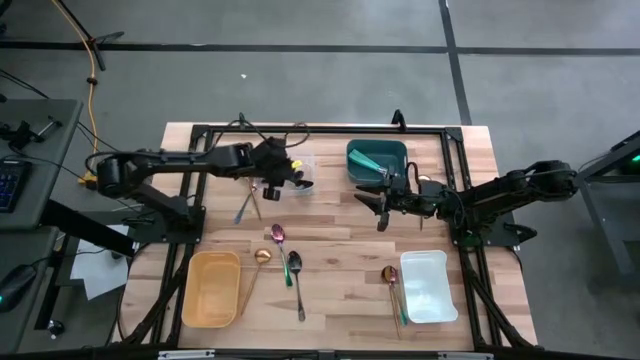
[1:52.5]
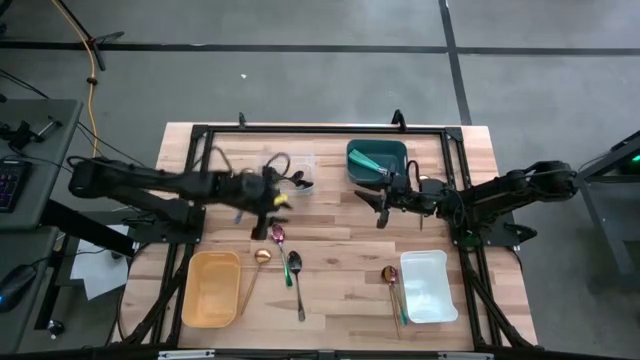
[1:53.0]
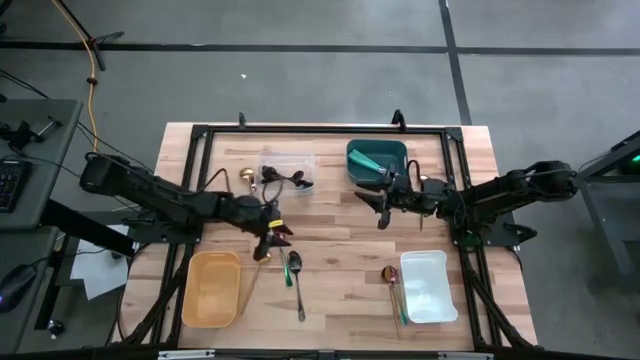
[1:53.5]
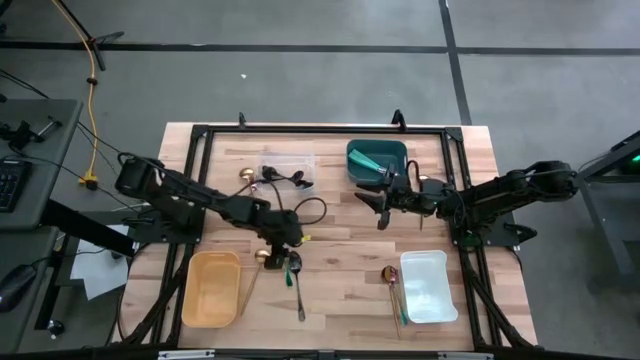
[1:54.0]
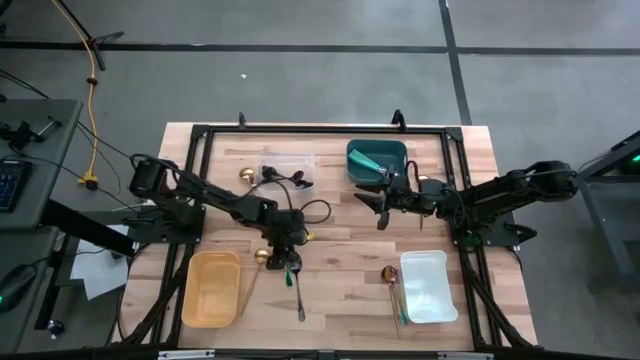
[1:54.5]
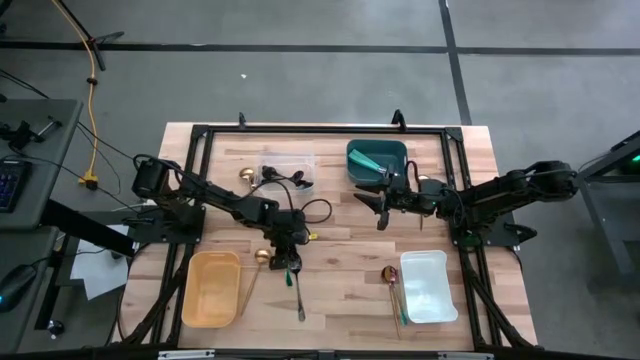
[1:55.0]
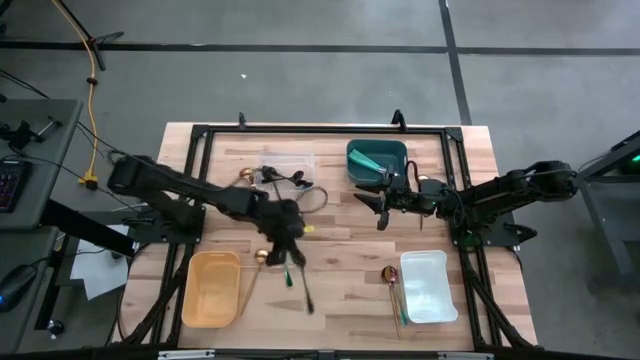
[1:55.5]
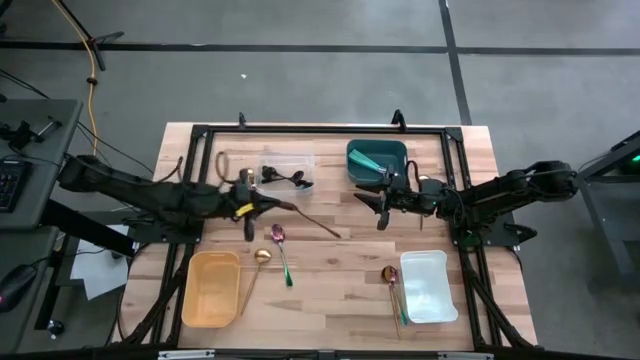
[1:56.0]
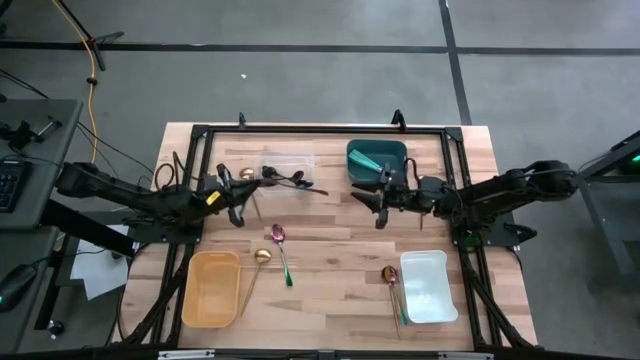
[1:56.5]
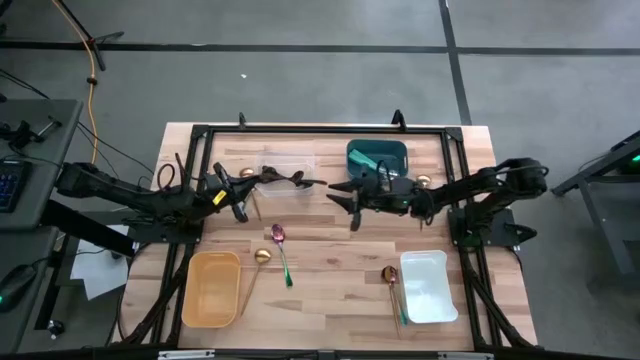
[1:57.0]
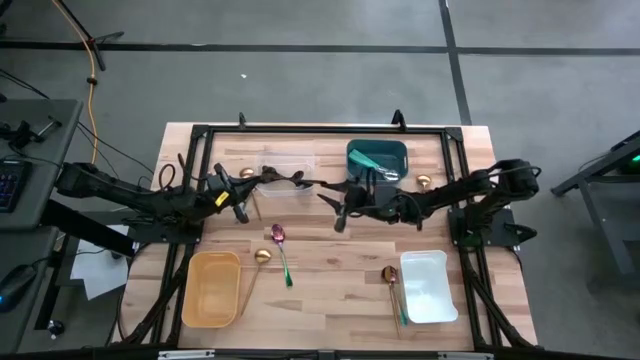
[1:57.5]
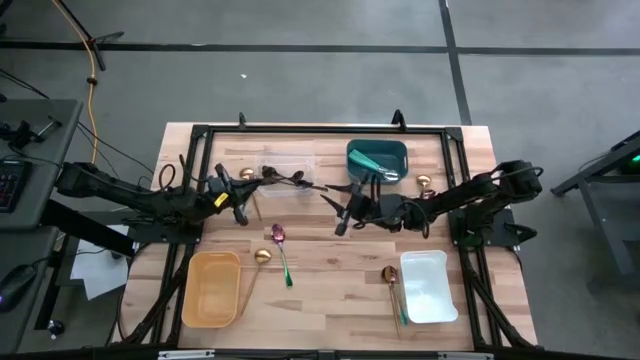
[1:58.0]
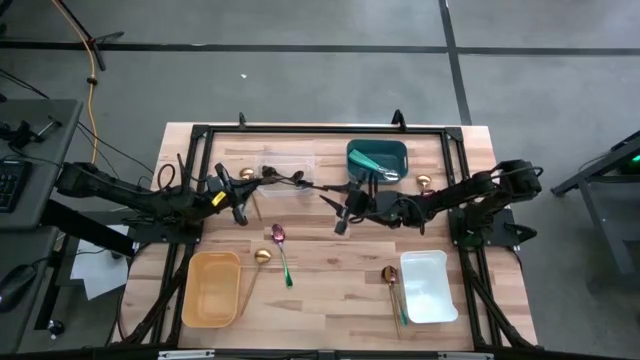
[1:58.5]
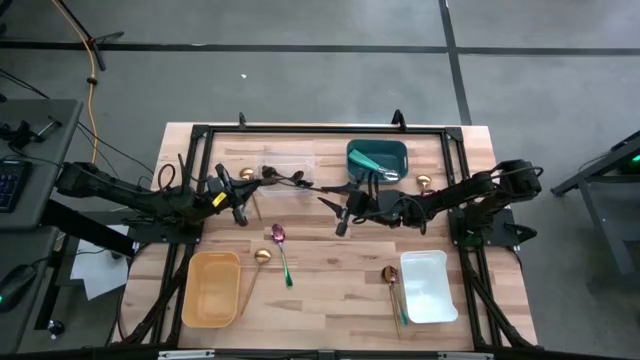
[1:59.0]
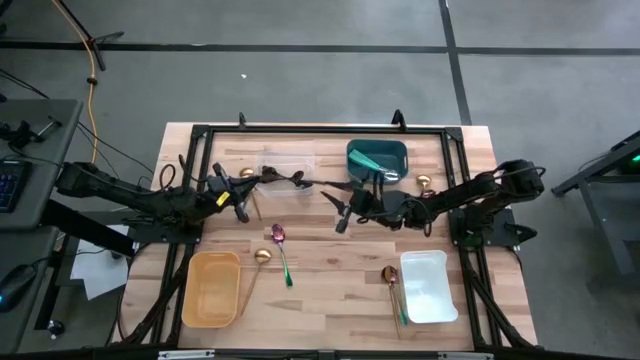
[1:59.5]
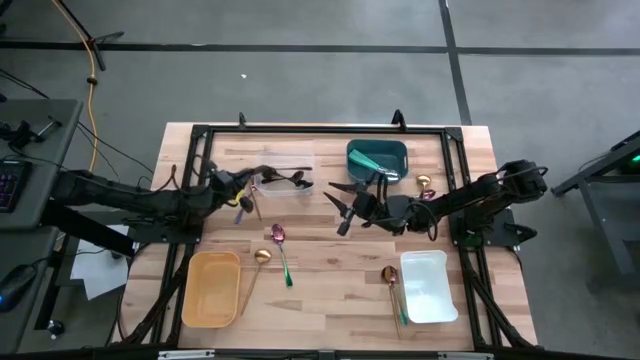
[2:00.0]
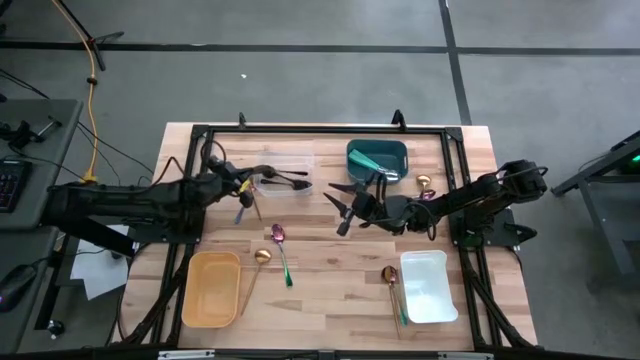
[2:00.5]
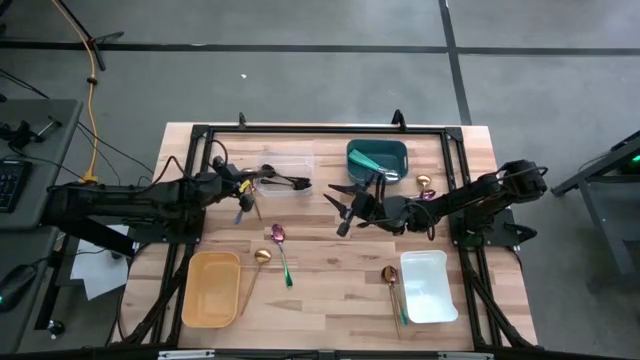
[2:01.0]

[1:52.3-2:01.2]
Task: Sort silverware by color (type)
Put the black spoon into the transparent bin

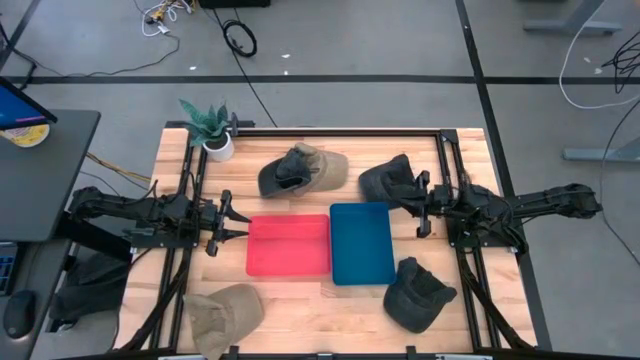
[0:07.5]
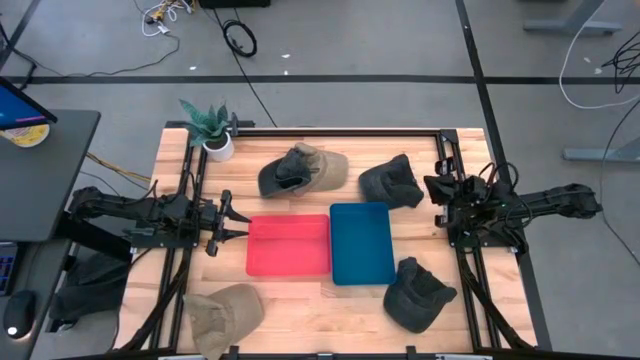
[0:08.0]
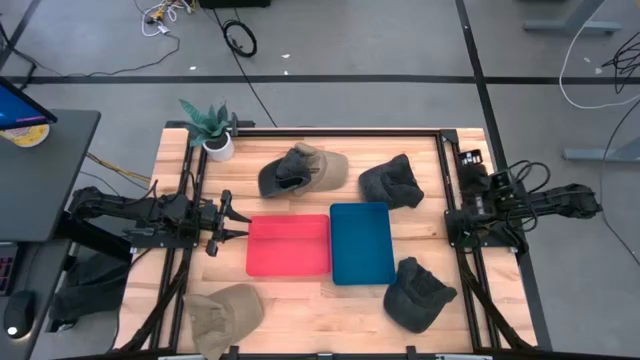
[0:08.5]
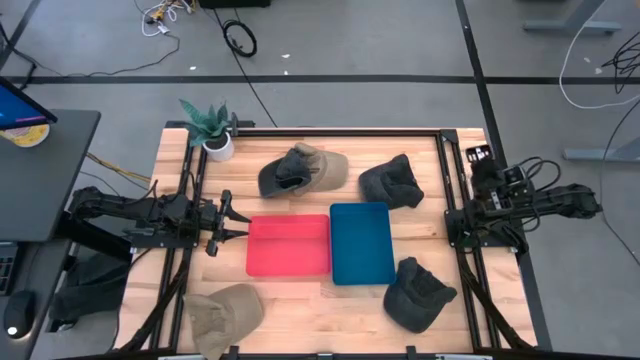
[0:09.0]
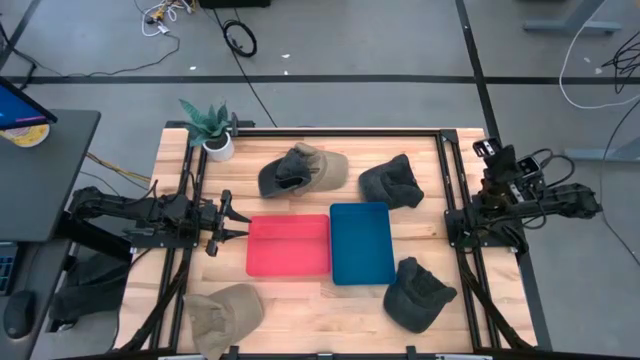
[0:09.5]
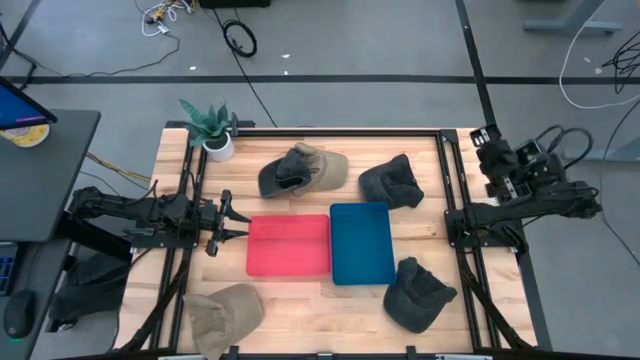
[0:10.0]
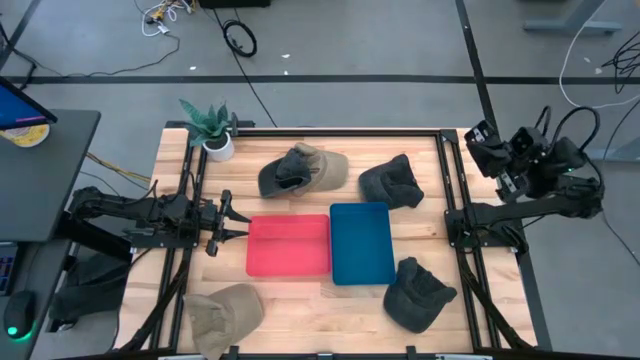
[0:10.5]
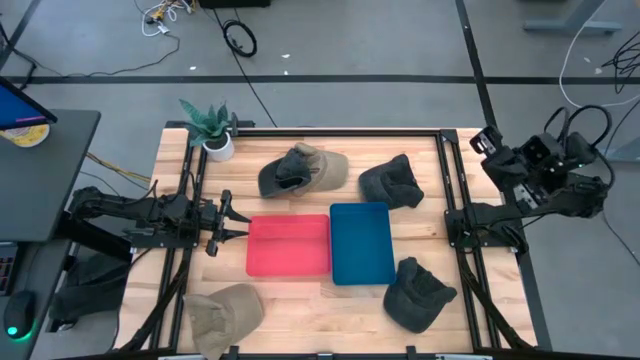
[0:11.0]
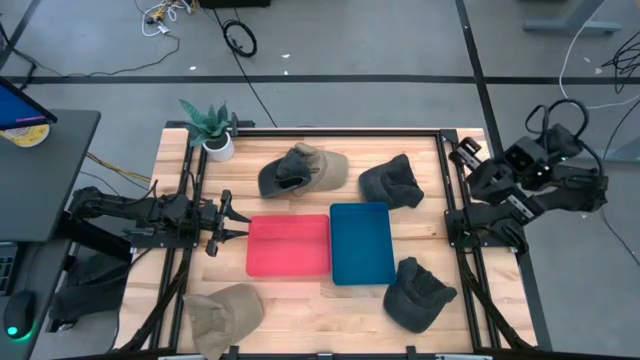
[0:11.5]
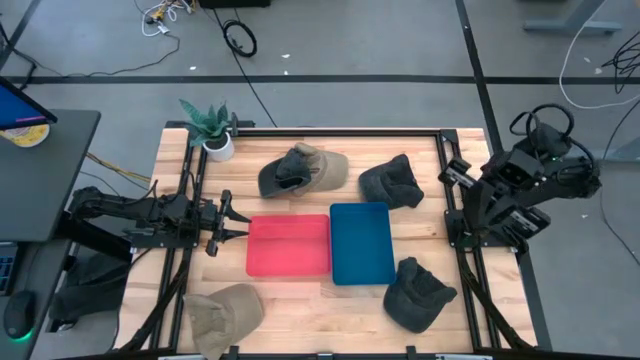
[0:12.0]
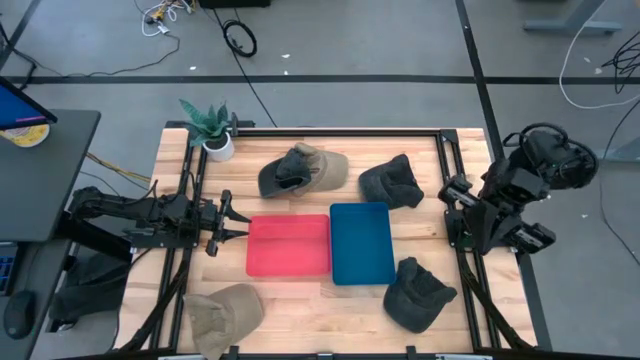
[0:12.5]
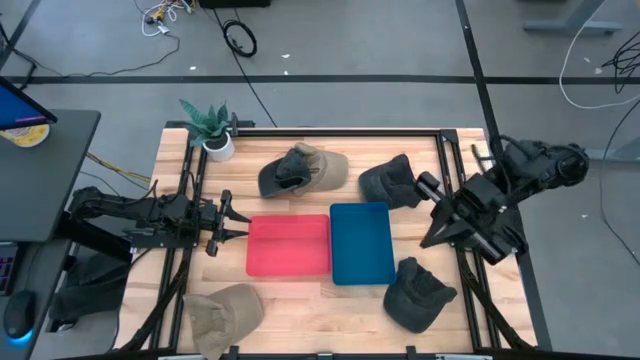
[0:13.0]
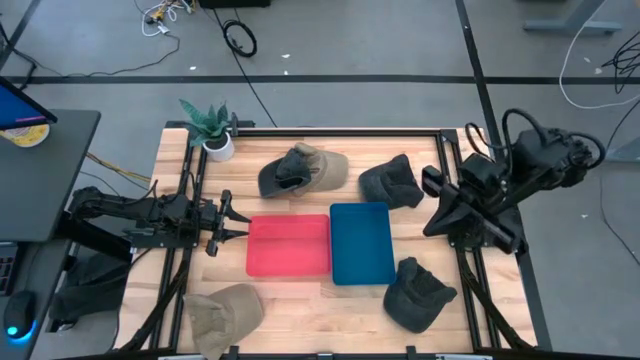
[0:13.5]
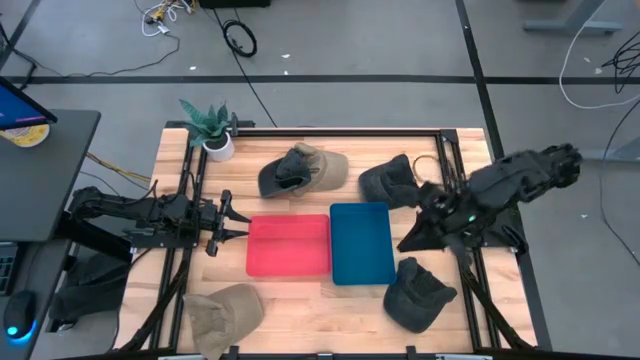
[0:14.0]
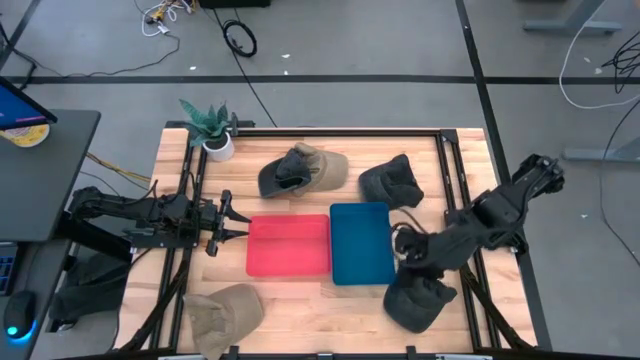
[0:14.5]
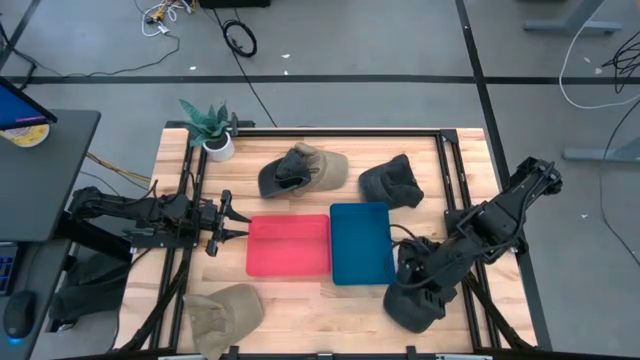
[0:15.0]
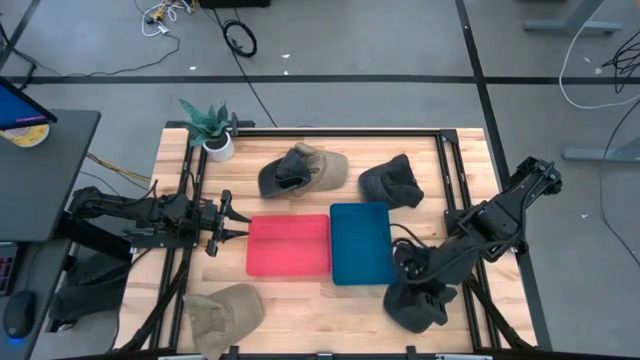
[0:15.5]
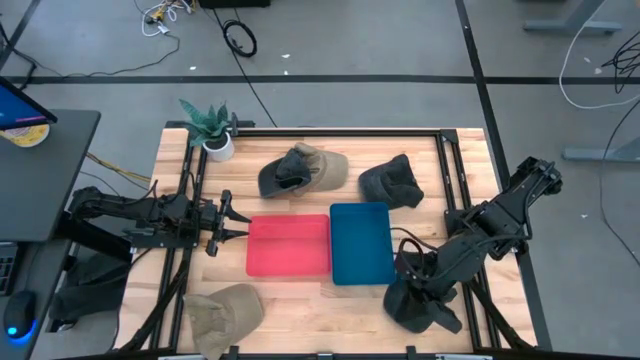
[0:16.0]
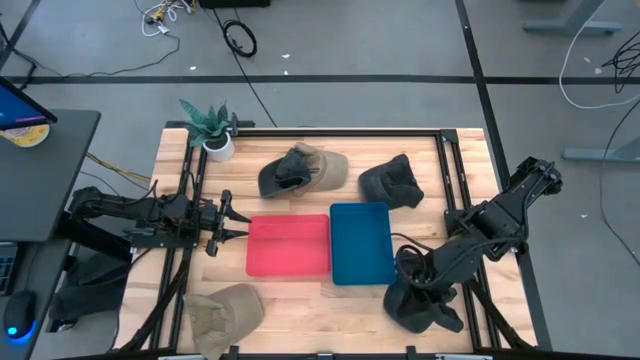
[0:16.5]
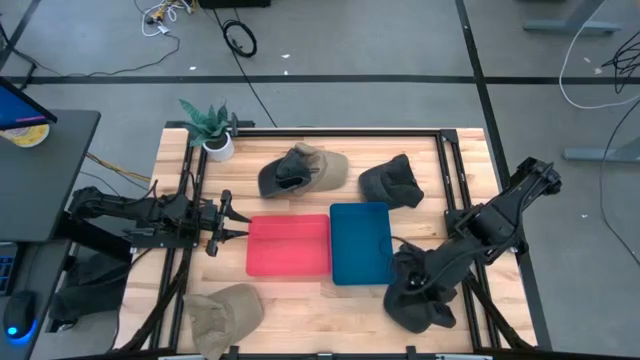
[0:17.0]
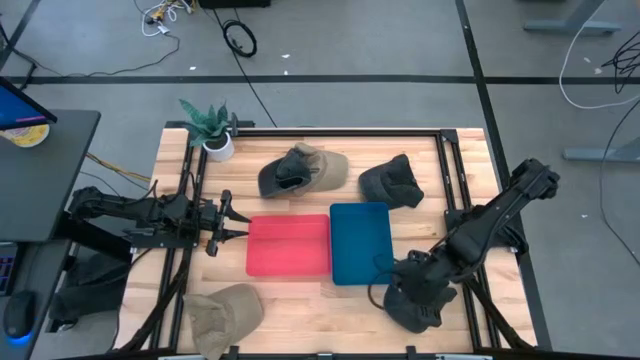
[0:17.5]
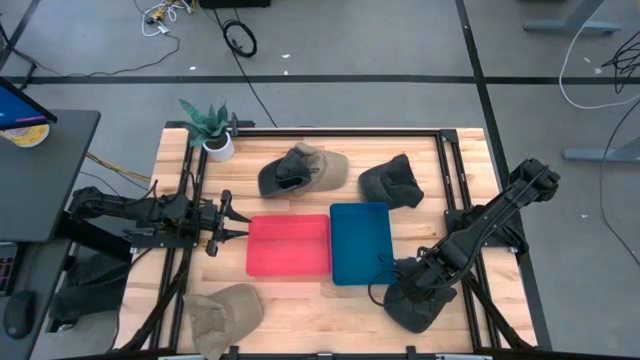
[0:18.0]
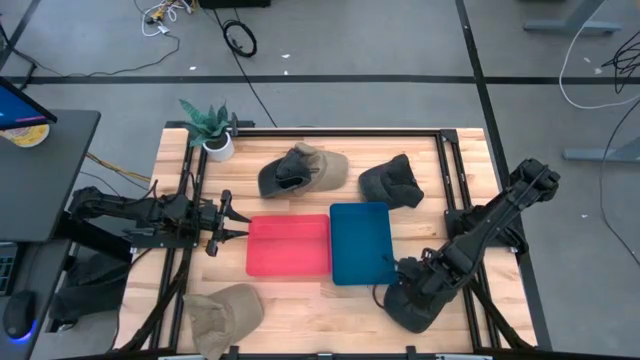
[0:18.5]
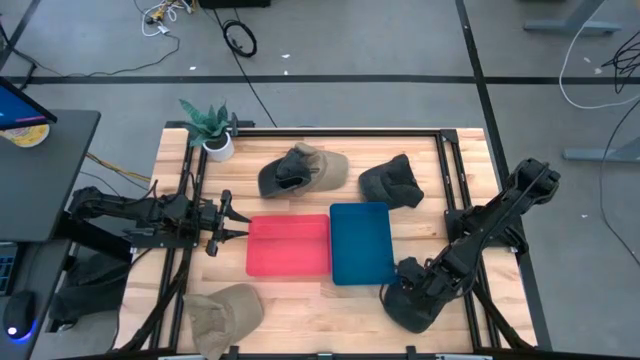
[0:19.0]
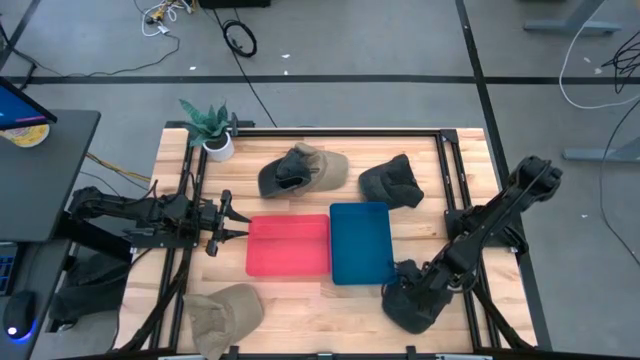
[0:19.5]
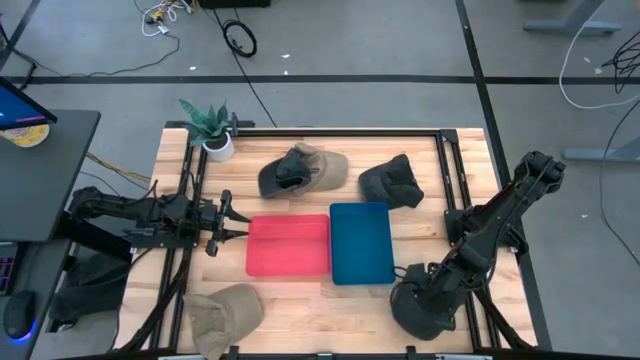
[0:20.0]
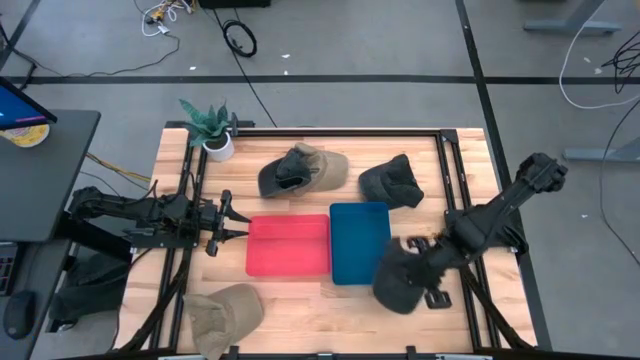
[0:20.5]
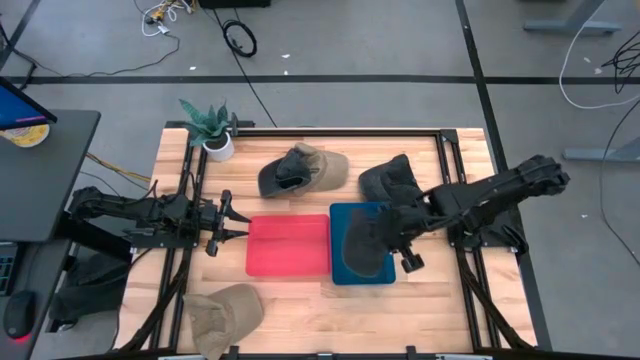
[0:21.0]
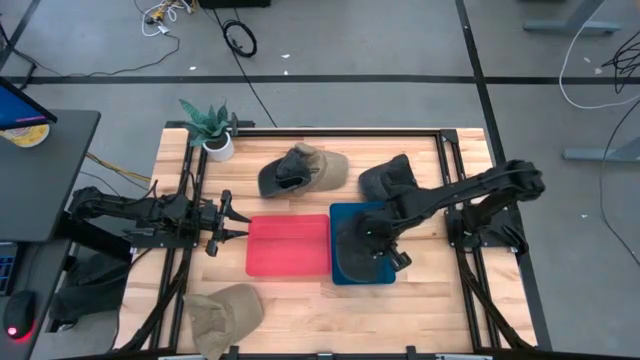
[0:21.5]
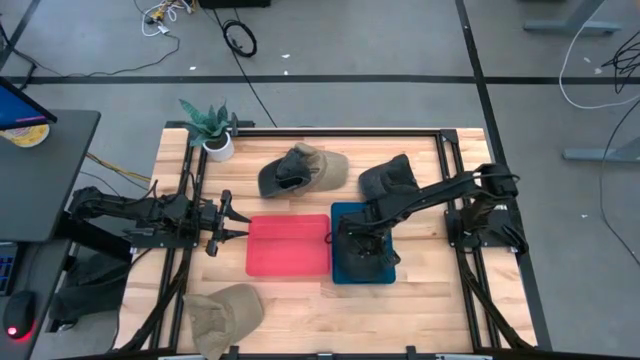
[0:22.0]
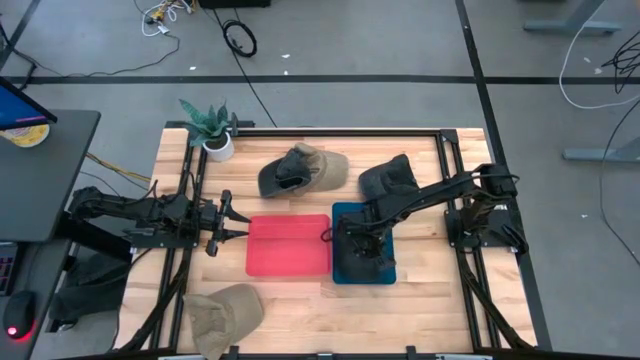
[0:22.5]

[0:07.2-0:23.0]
Task: Pick & Place hat
Put the bottom black cap into the blue bin
